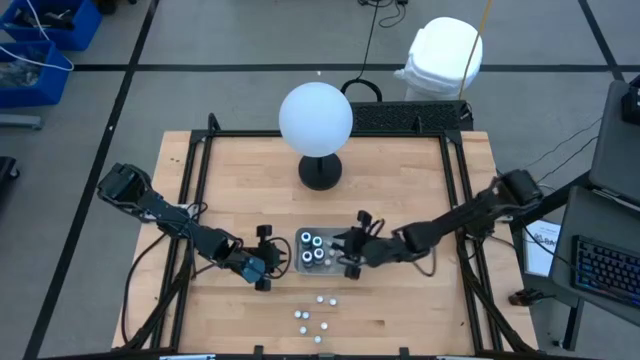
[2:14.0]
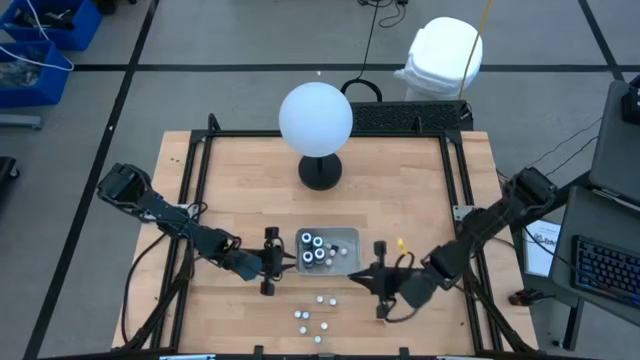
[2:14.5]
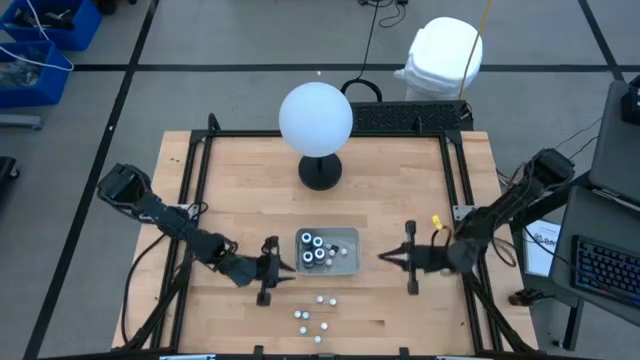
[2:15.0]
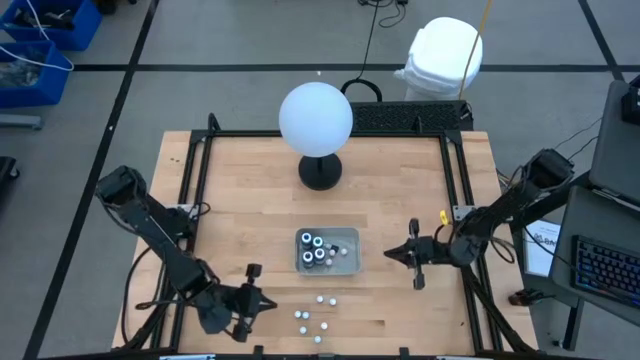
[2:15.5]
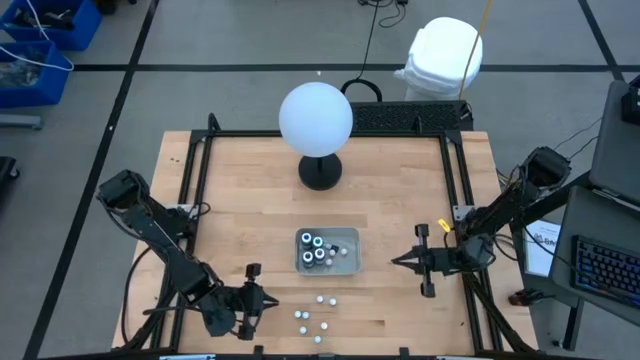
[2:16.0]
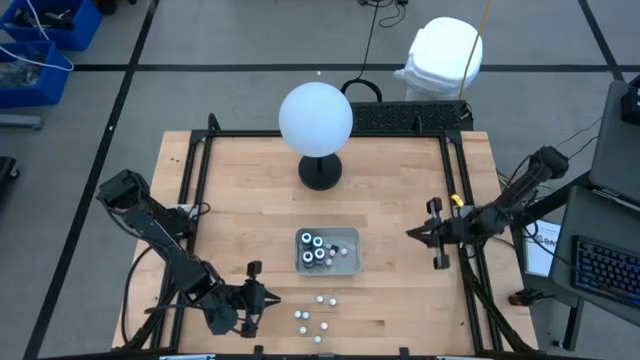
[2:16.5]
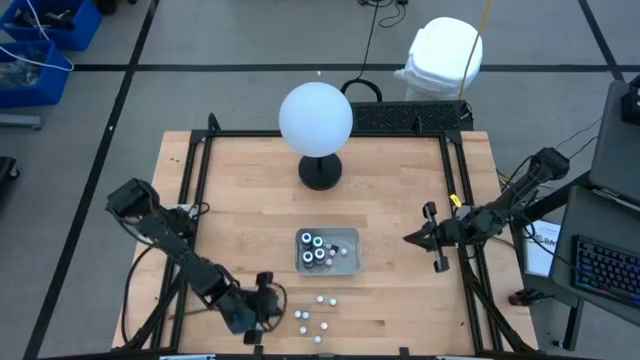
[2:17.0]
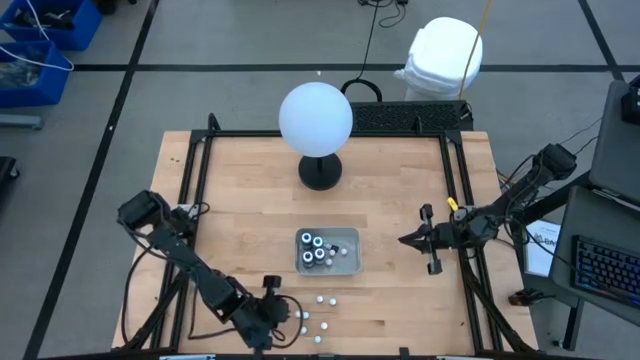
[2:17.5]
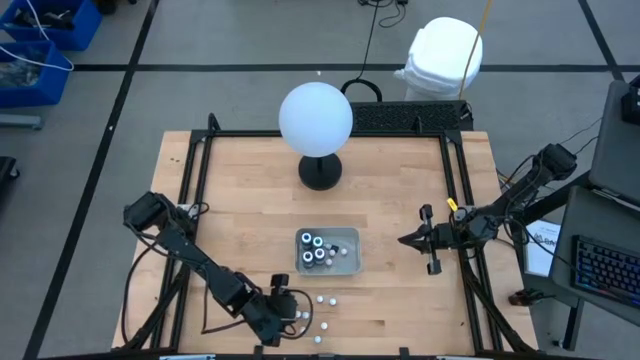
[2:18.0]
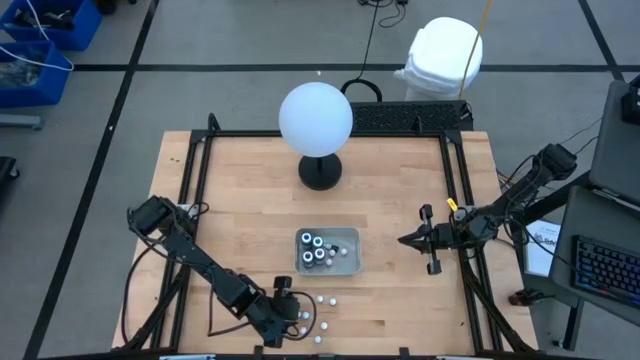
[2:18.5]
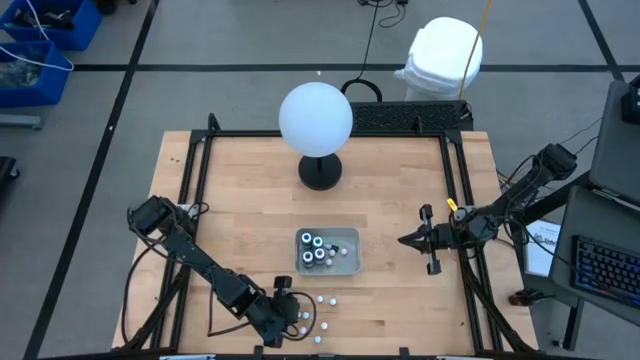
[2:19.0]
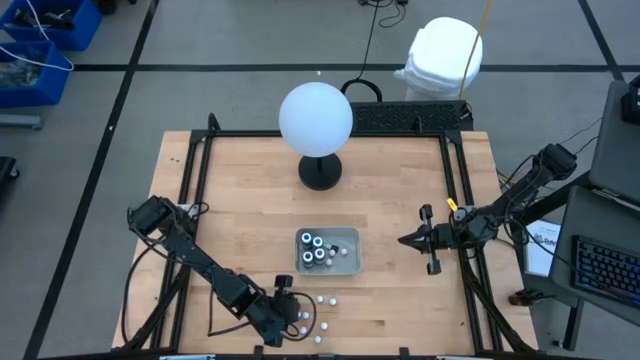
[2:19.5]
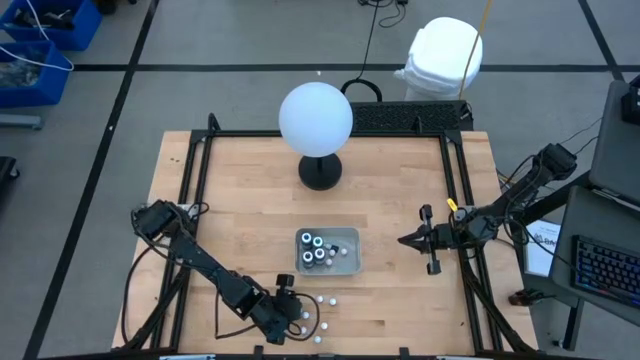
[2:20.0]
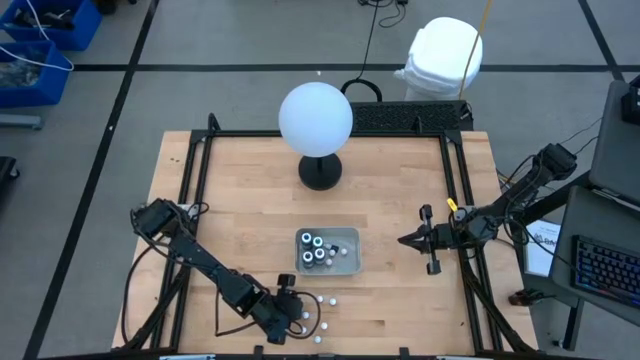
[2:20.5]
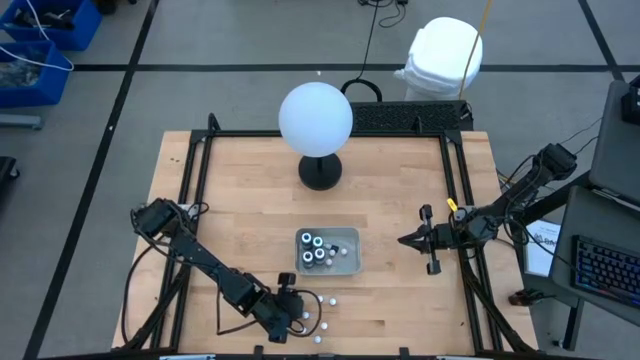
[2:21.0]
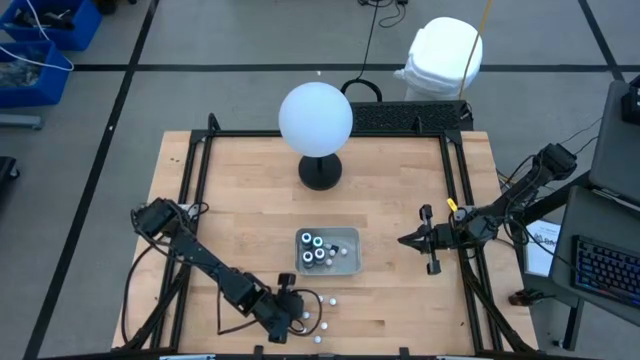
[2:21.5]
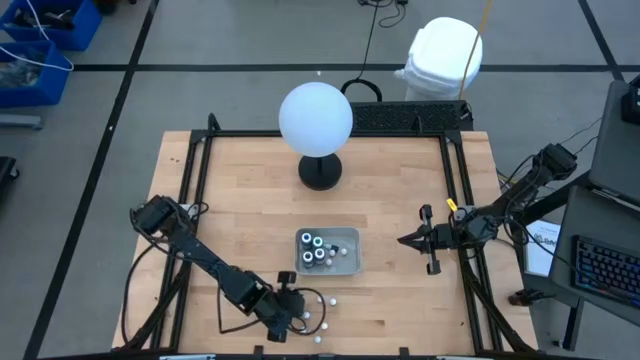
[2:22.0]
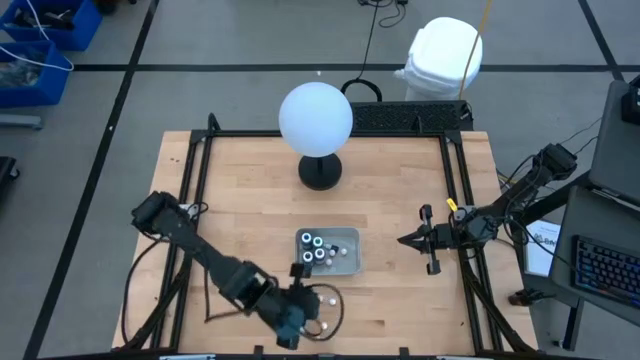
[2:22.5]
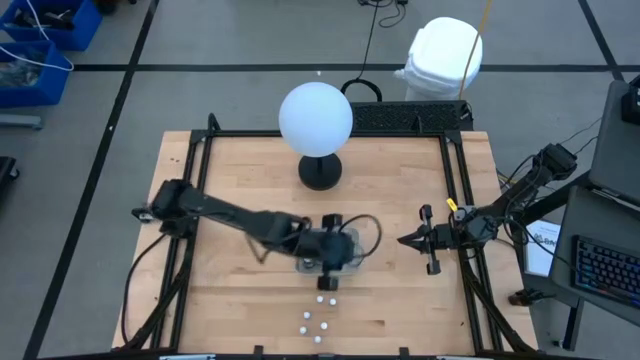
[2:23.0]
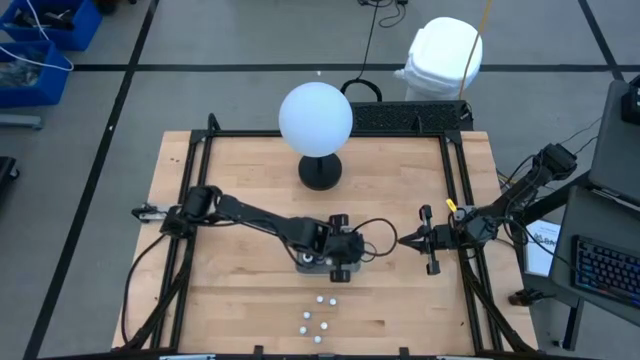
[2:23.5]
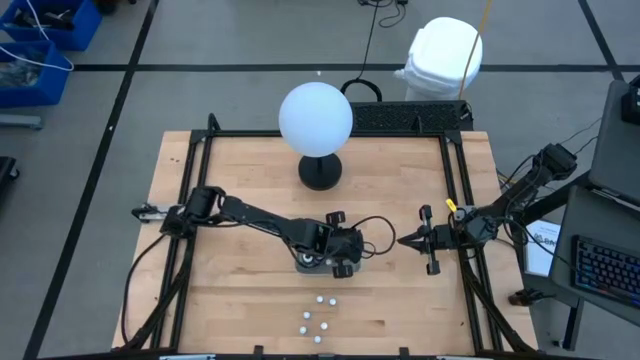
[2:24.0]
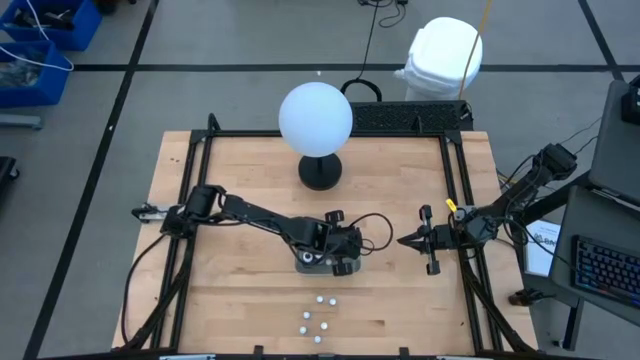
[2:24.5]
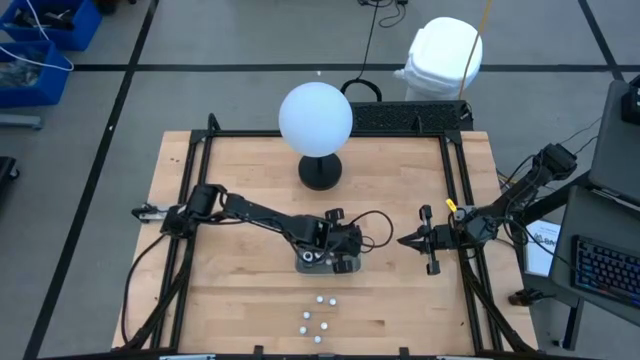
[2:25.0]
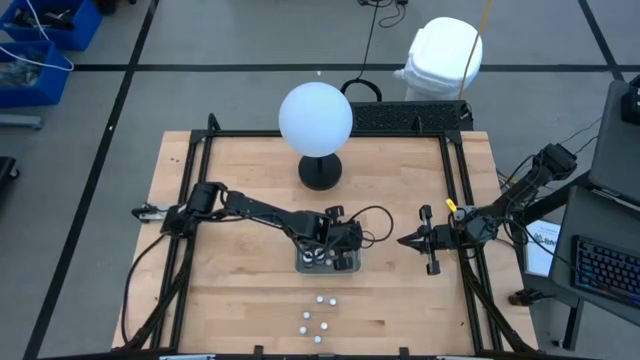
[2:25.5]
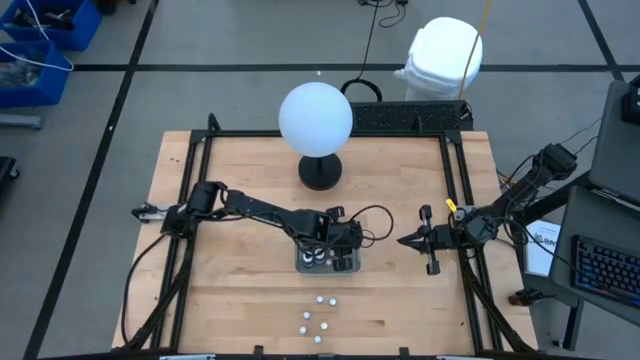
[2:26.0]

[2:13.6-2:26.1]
Task: Pick & Place food coloring
Put the small black food coloring bottle into the gray bin

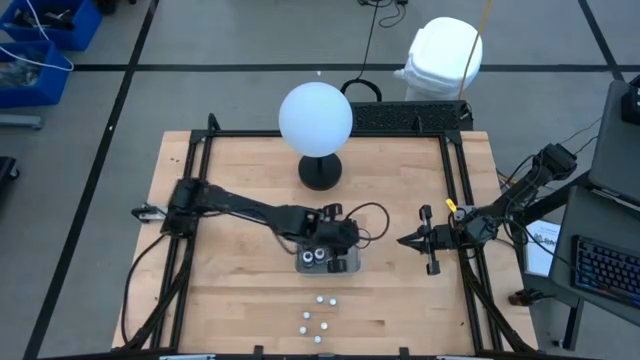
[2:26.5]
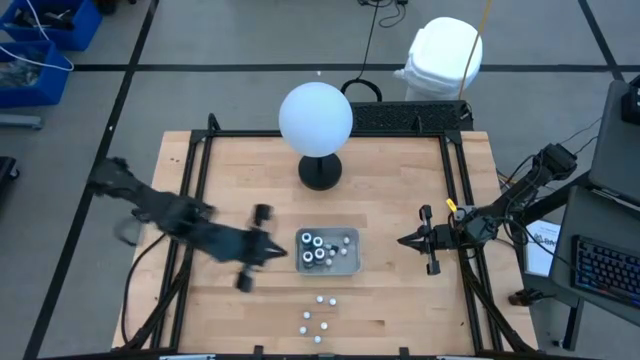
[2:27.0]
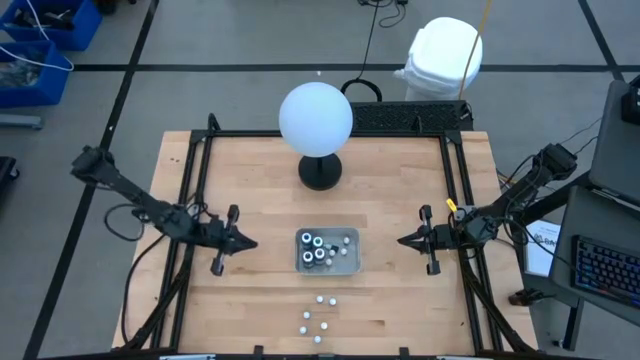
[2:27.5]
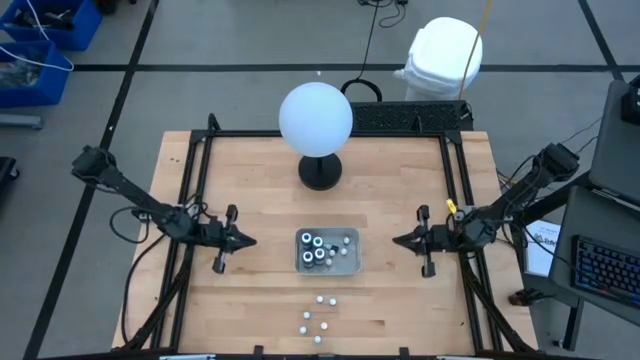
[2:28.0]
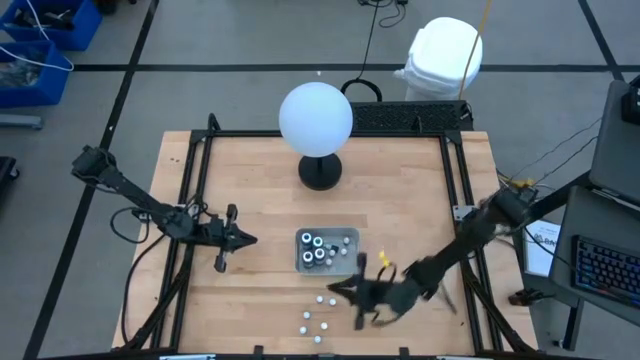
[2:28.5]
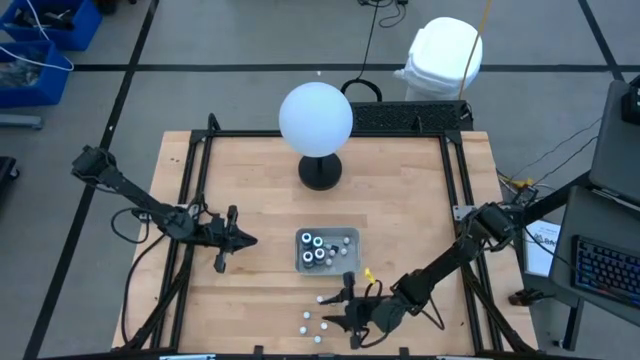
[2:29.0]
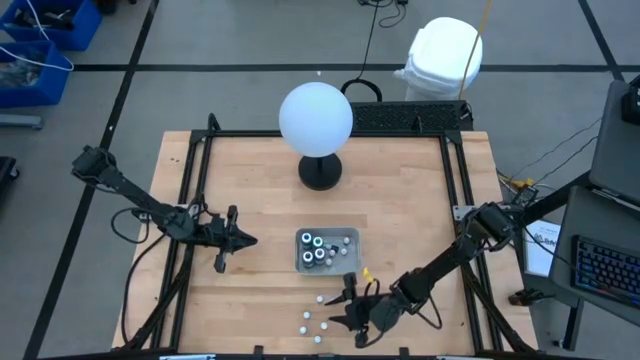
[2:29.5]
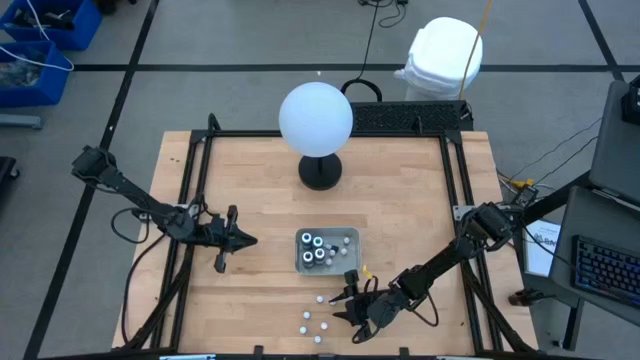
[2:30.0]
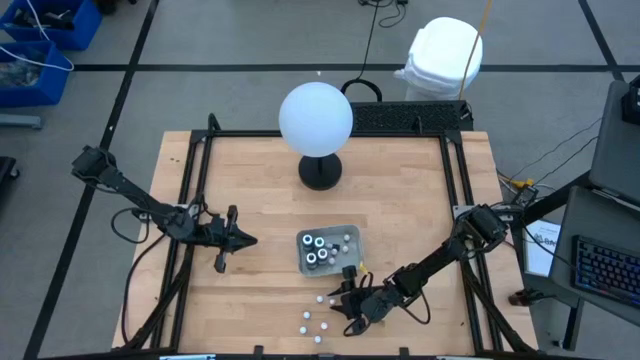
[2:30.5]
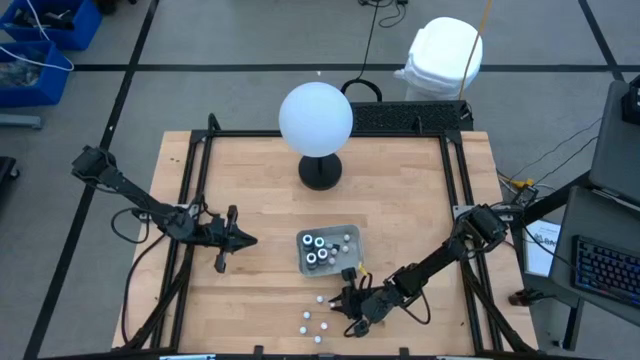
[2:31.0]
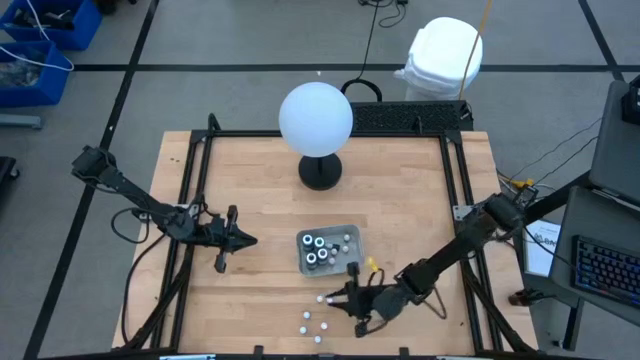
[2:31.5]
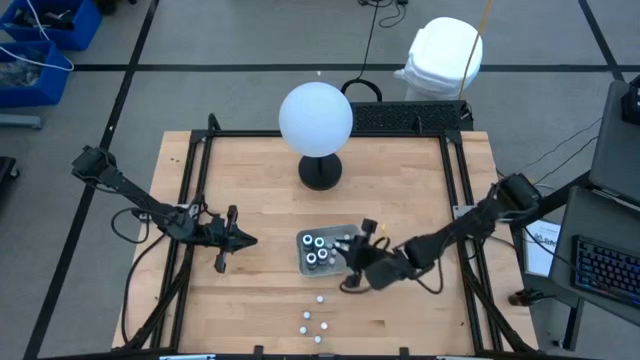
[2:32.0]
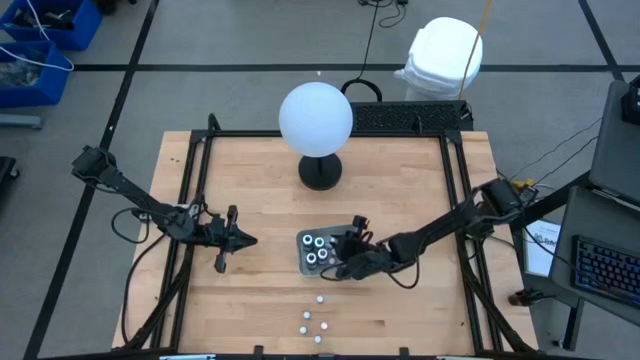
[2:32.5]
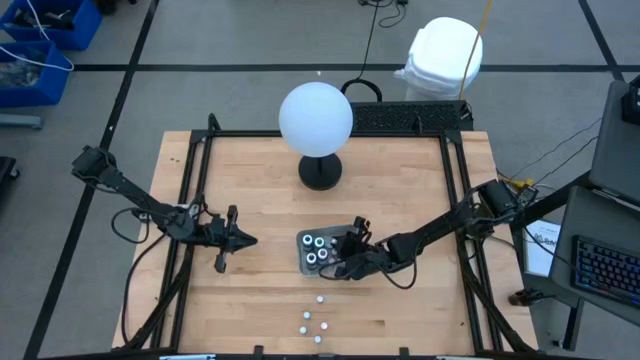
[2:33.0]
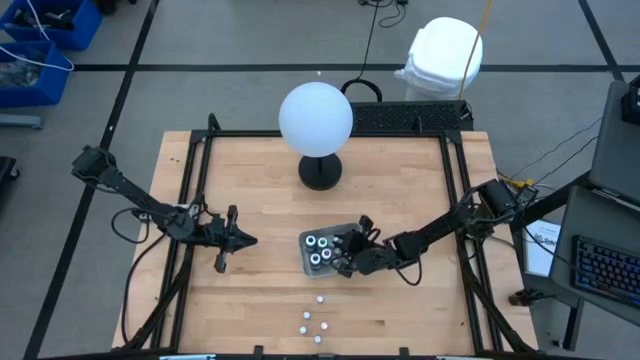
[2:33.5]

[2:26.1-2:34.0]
Put the small violet food coloring bottle into the gray bin
